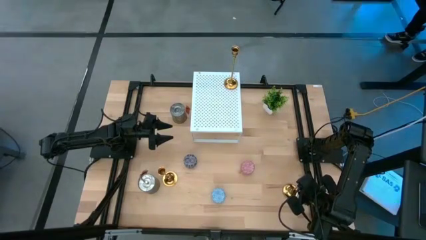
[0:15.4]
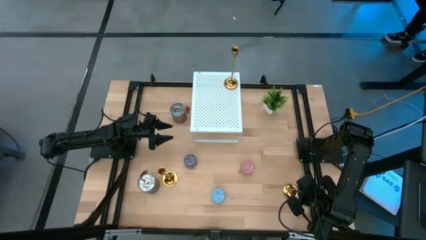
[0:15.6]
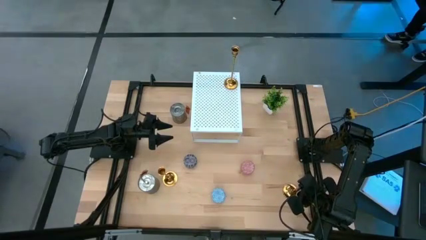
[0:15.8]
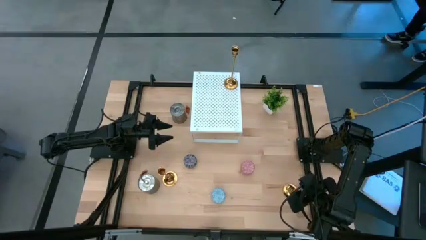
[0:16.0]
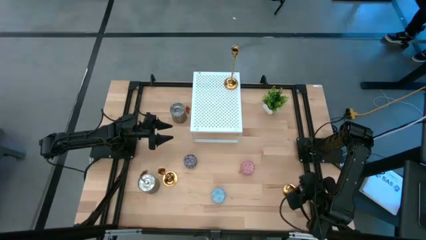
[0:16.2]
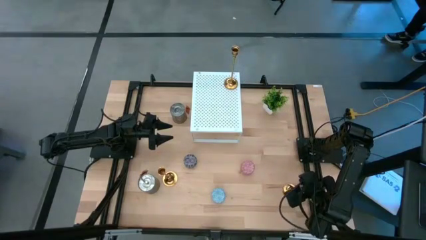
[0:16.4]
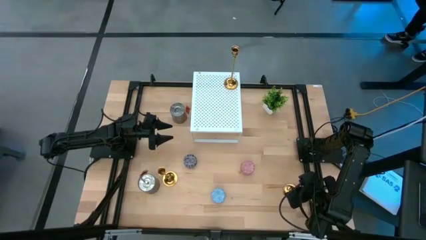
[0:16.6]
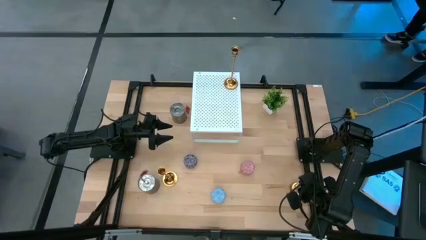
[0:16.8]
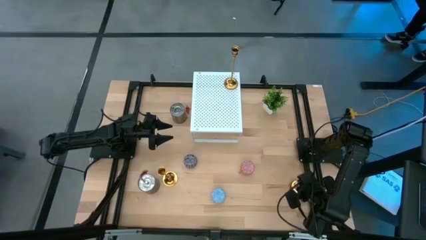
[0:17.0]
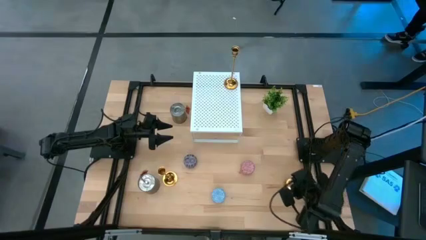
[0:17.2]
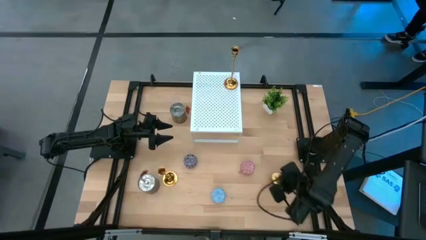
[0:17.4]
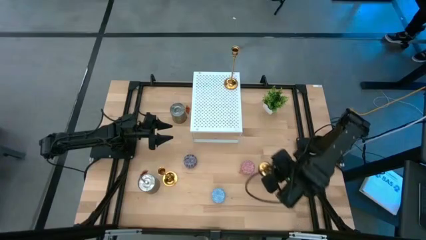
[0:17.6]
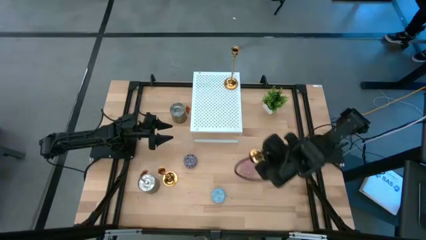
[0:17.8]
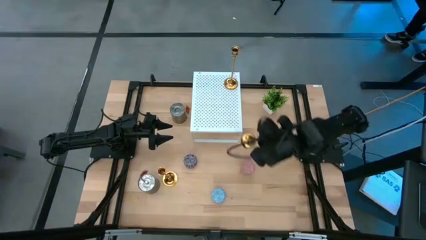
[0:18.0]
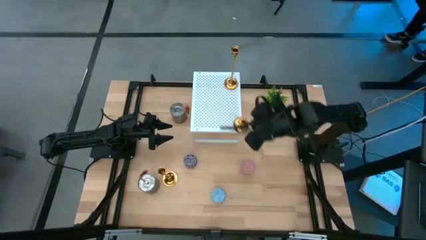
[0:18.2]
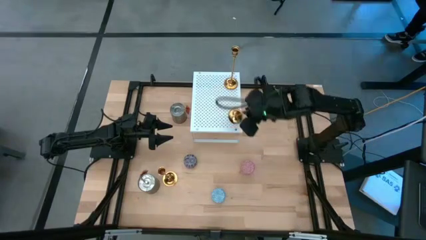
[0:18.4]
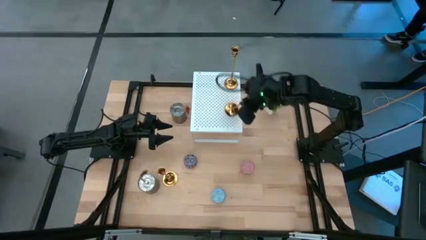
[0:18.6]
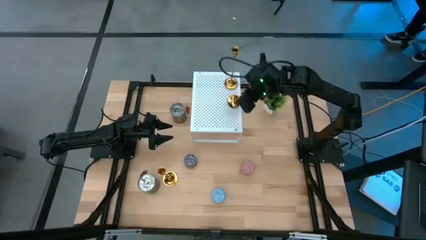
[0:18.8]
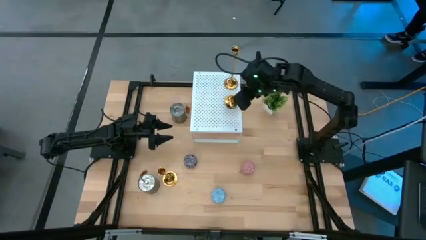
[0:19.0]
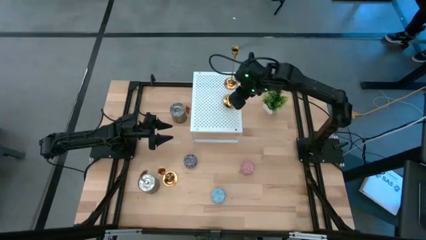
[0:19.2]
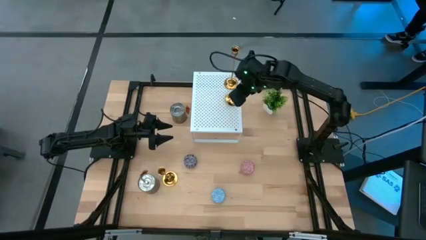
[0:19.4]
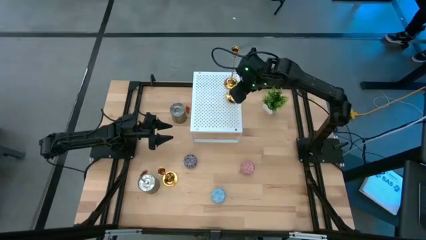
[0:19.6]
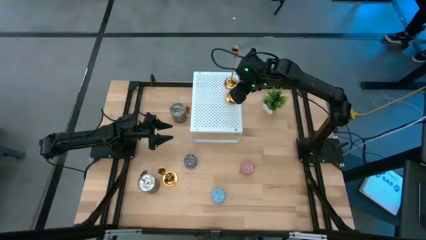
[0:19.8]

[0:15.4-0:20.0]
Task: Pick & Place candle stick holders
Put the right gold candle holder on the shelf

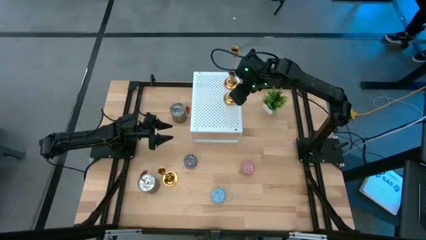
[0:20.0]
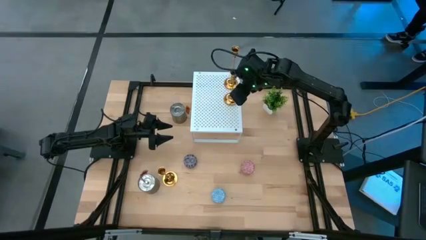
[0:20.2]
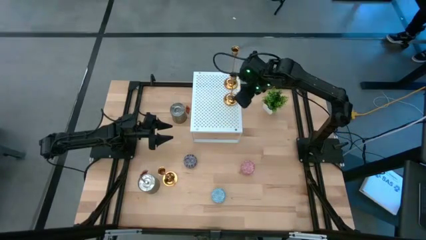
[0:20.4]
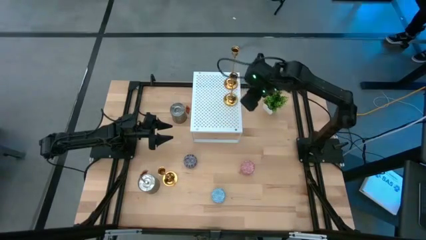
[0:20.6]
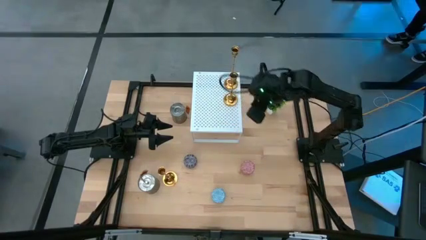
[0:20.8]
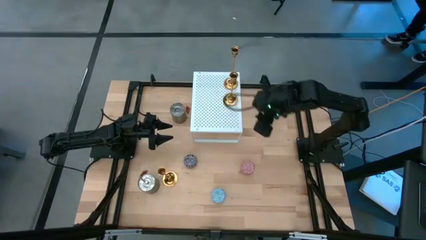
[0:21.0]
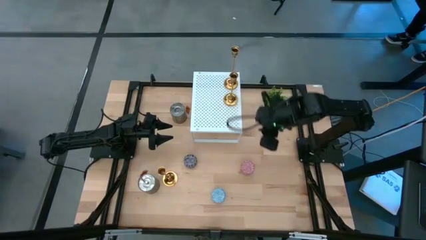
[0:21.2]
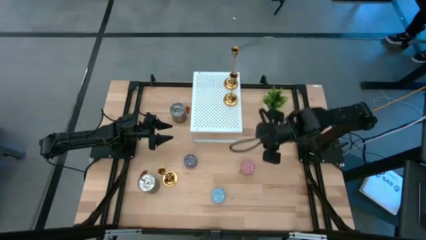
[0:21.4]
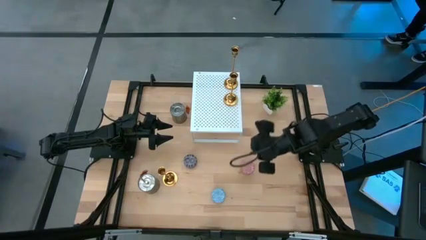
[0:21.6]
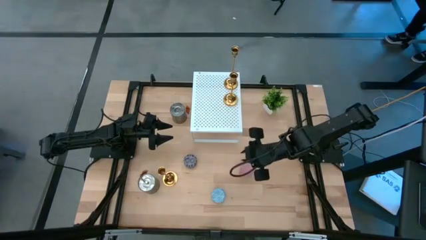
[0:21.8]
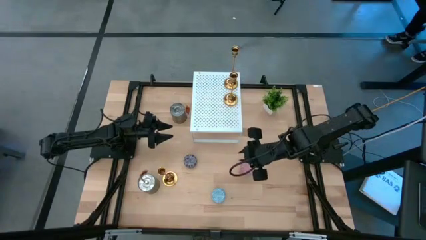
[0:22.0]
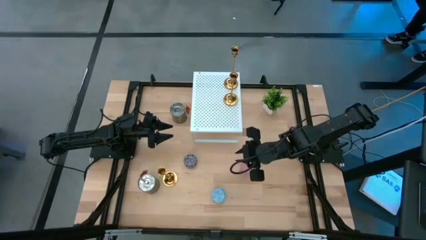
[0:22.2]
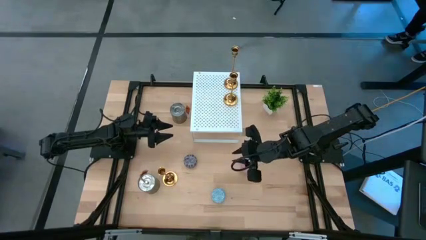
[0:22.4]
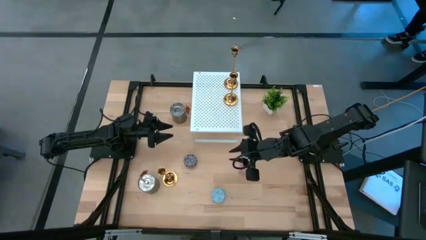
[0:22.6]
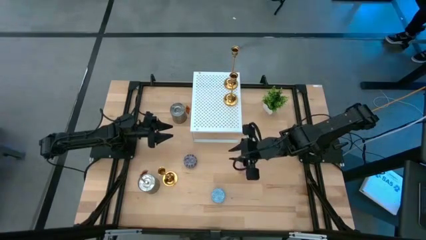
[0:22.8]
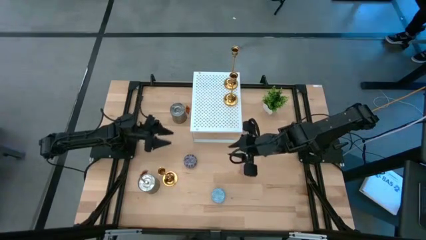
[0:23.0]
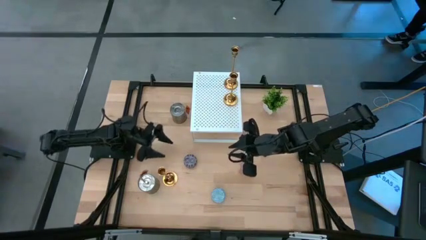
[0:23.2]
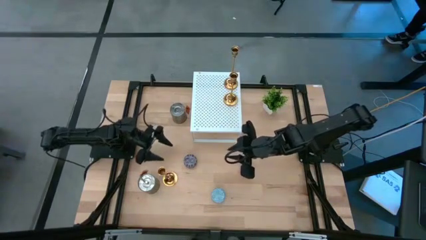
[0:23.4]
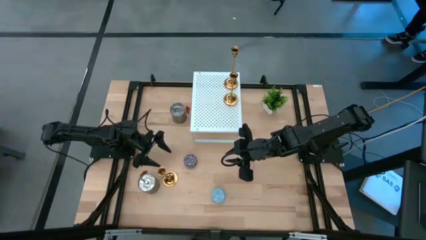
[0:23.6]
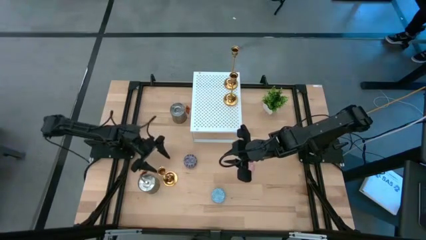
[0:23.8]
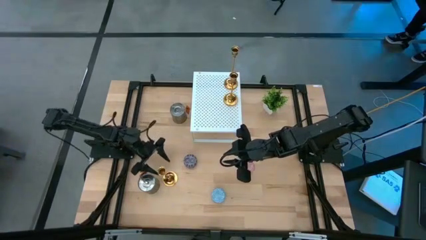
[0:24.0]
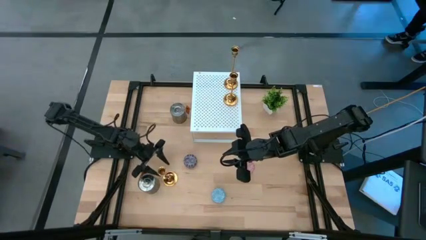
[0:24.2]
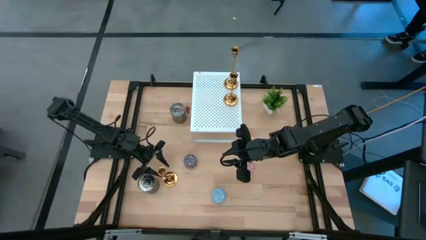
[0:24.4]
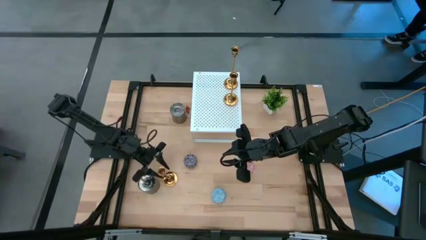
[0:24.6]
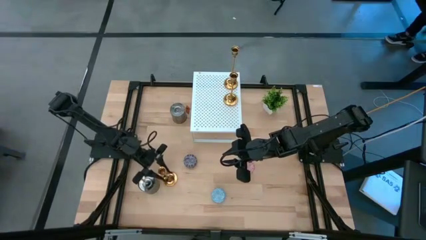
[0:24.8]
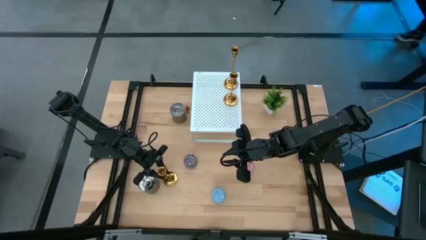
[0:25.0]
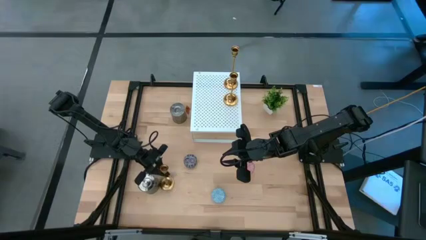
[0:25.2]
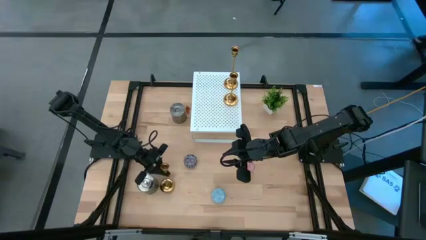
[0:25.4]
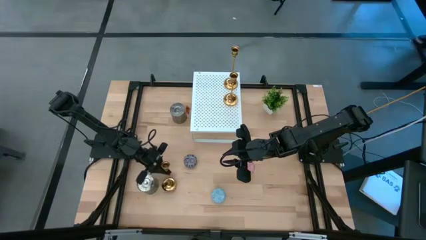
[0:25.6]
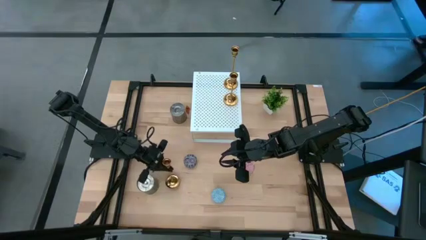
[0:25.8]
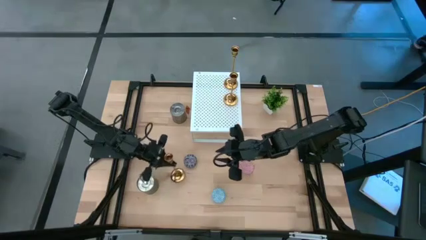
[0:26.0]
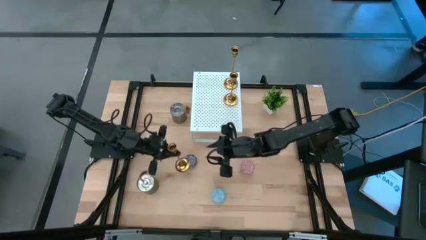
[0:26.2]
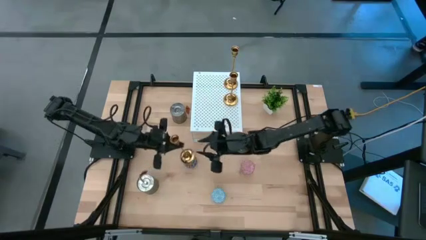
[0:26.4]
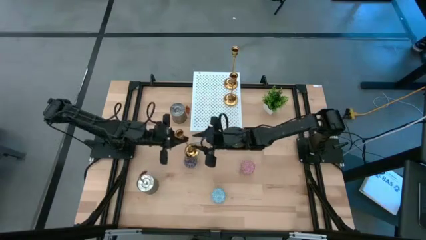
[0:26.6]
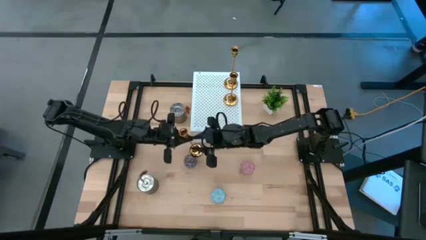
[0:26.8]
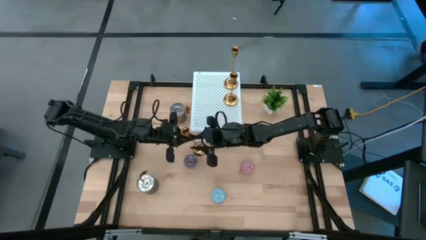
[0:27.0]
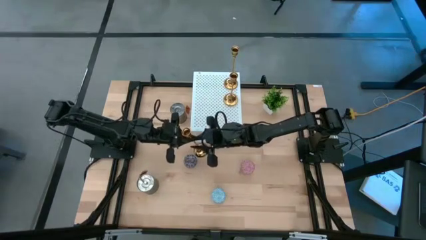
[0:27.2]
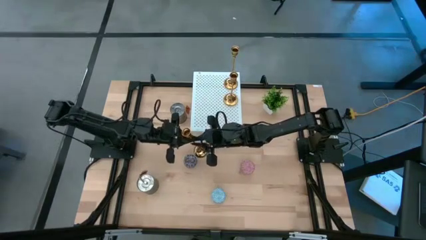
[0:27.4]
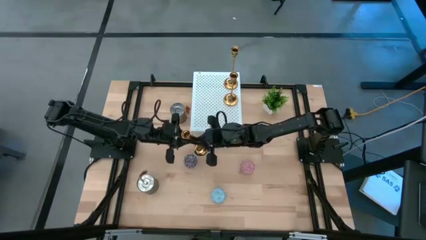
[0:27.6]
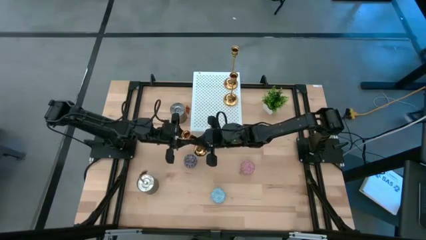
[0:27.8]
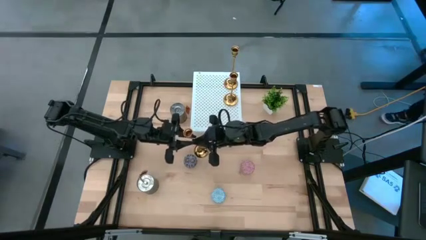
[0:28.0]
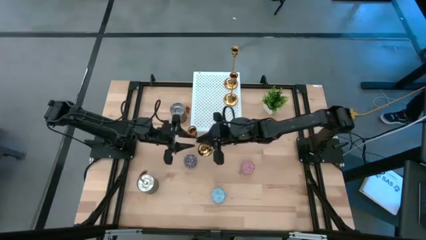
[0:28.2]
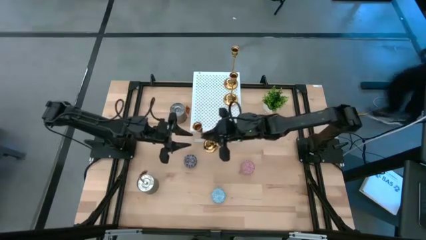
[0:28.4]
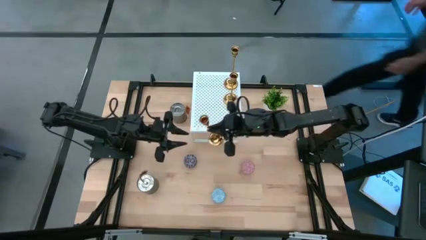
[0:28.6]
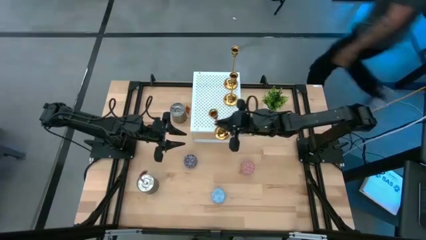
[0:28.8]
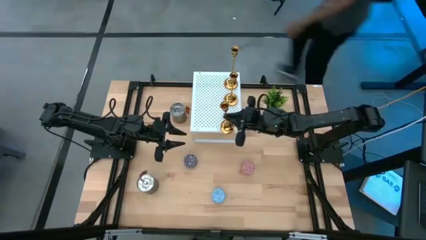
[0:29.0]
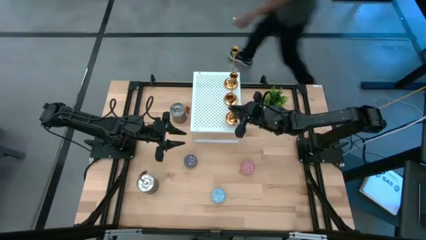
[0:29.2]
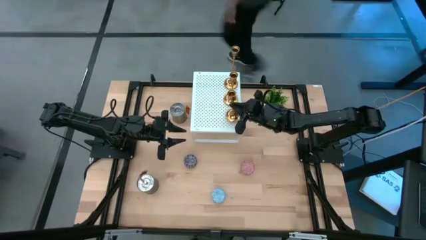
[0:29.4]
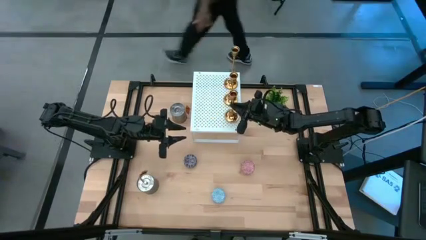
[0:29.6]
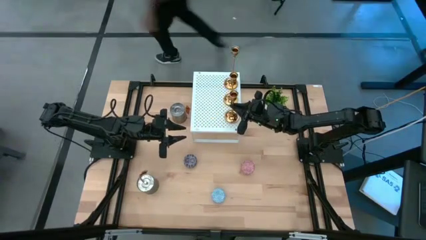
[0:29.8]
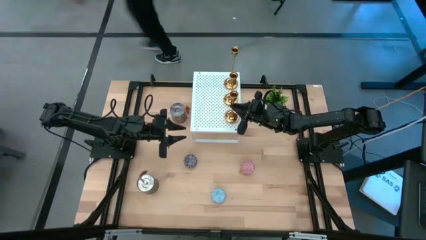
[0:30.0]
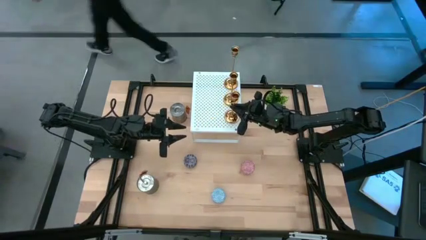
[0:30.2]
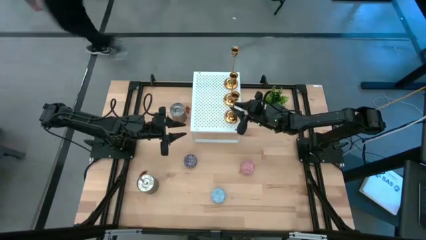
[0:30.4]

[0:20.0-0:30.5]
Put the gold candle holder on the shelf

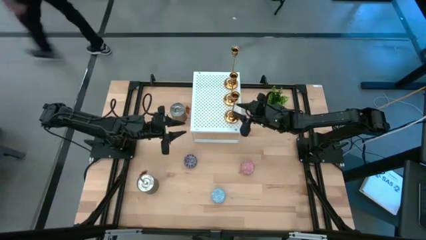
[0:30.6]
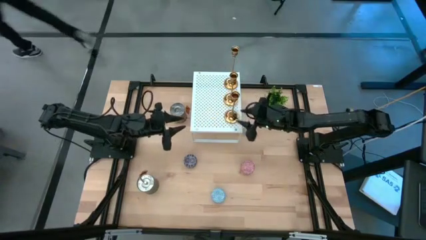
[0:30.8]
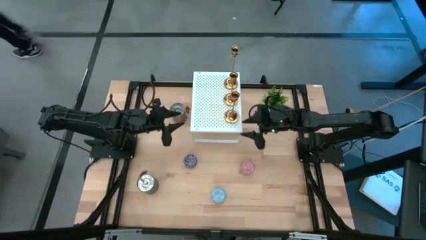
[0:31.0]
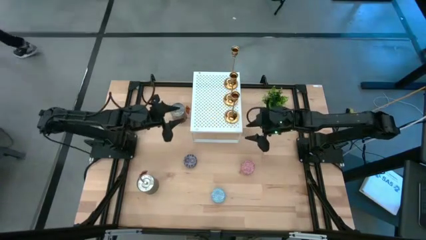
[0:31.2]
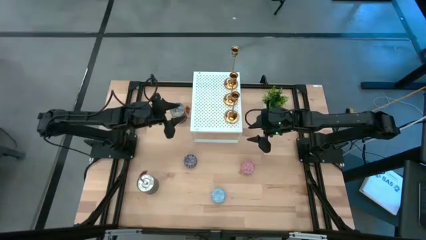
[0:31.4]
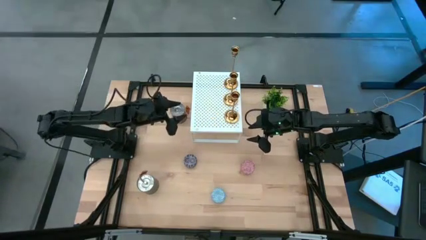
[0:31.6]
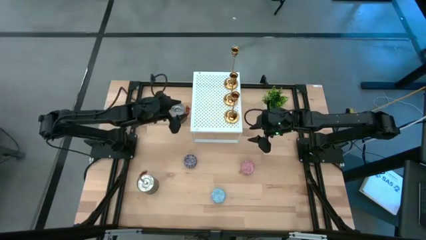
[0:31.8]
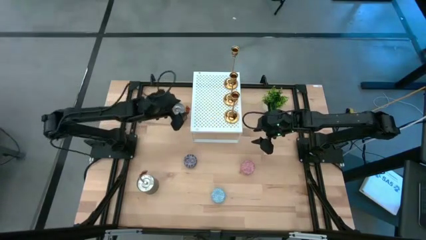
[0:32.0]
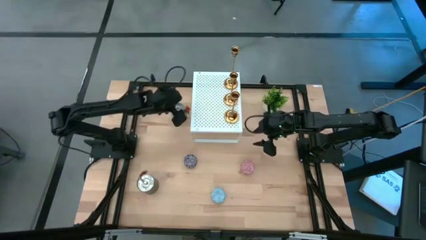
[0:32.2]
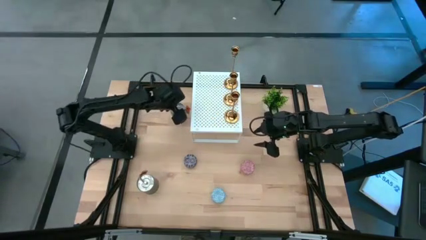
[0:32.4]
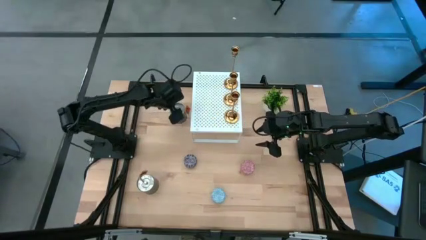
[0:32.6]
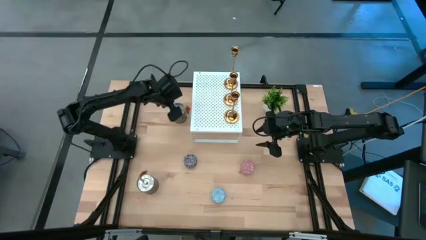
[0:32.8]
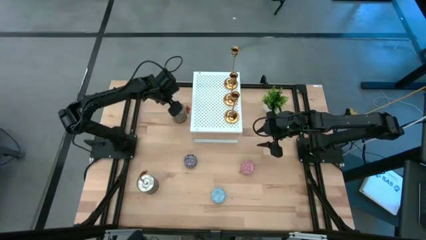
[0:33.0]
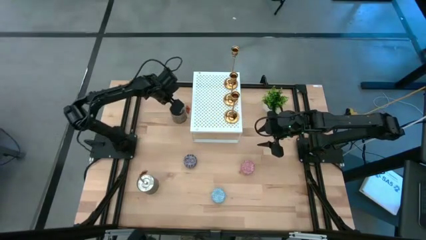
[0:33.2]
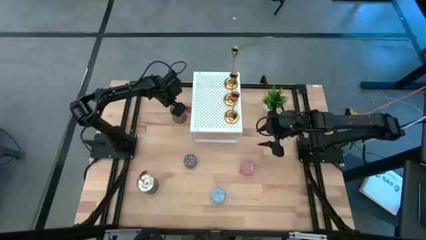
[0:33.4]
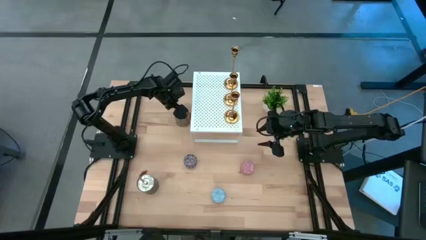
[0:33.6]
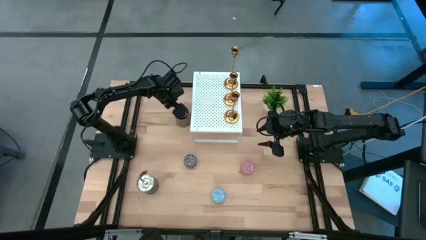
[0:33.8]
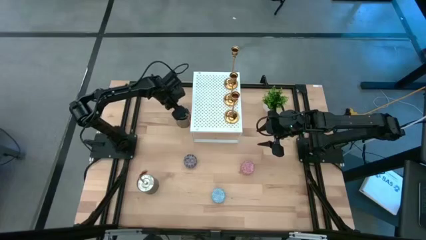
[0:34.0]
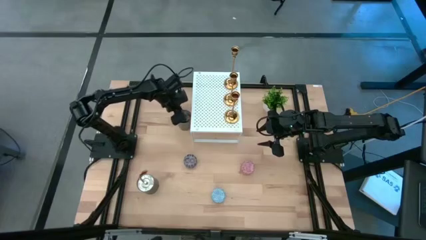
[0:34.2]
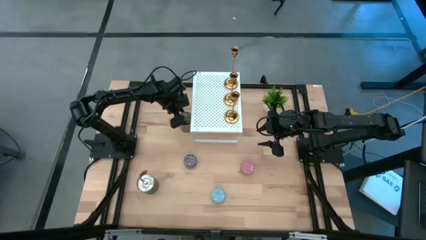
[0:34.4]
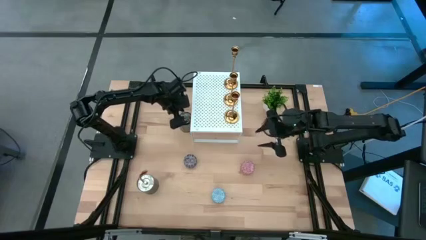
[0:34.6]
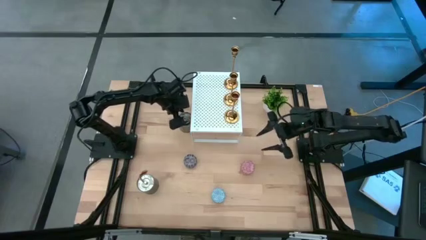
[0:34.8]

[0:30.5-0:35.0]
Put the top silver scented candle can on the shelf
